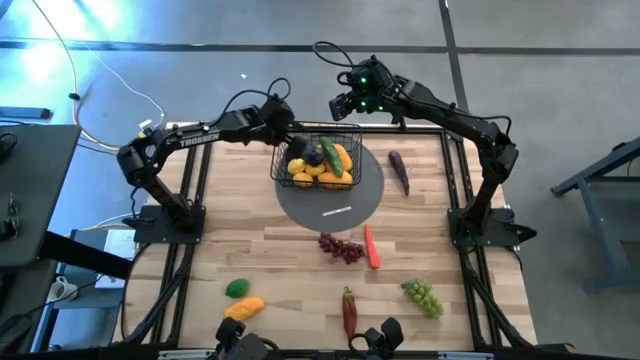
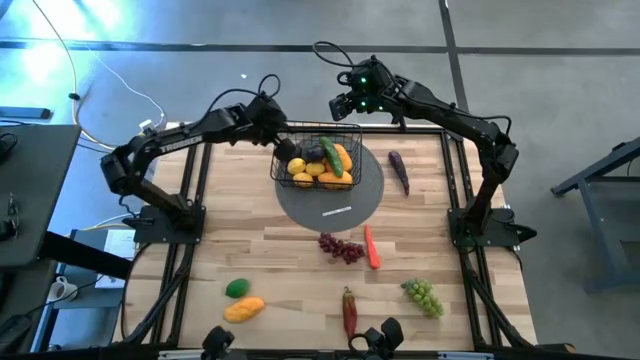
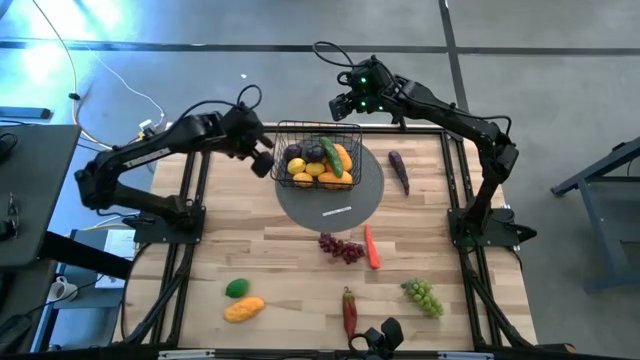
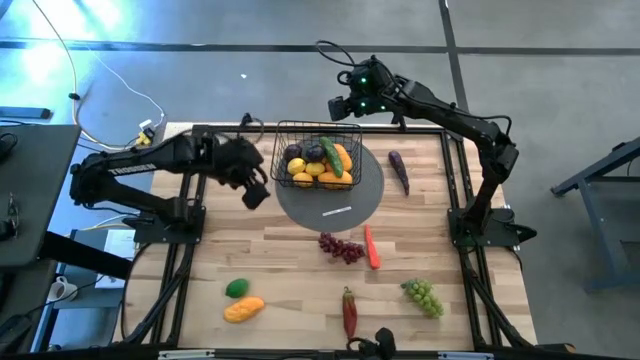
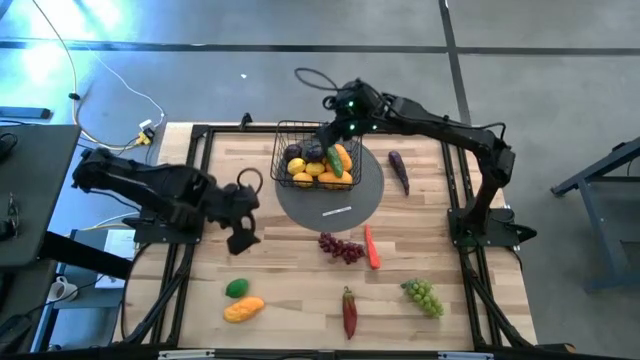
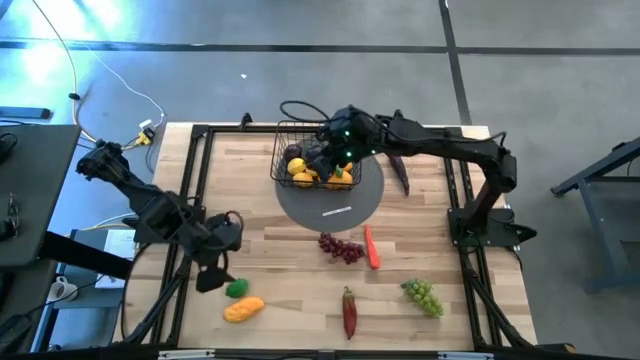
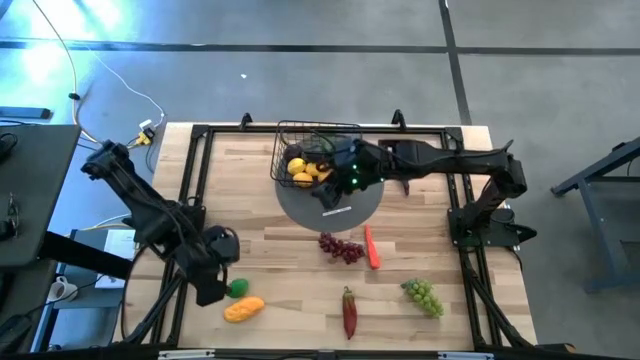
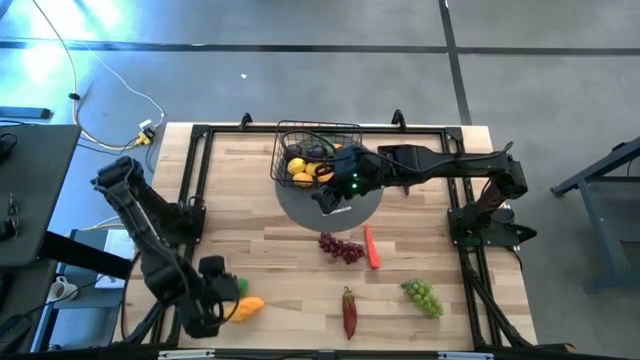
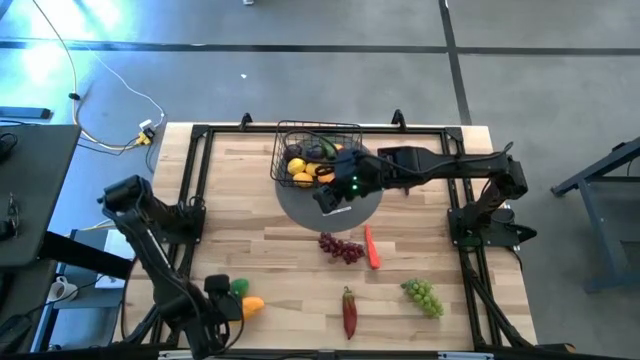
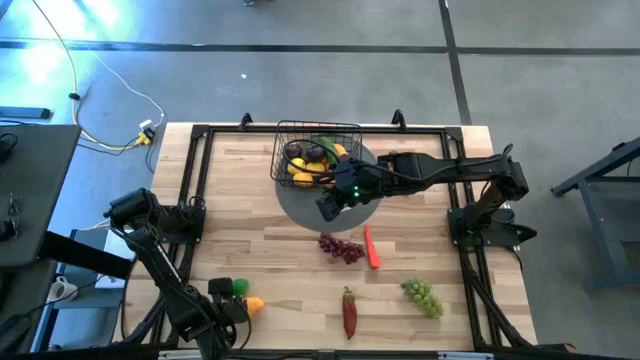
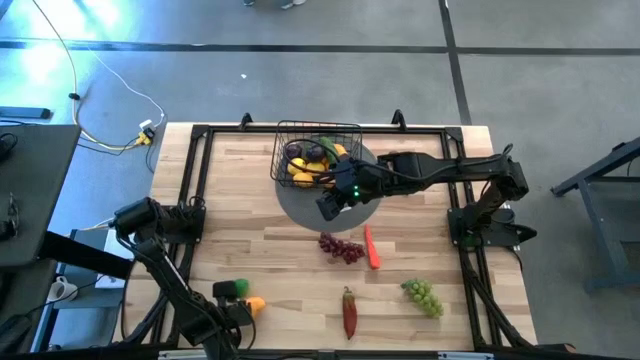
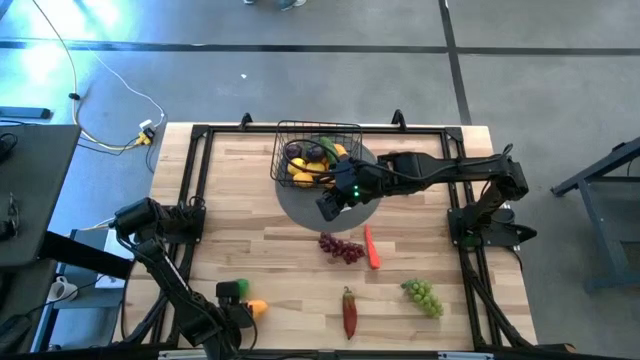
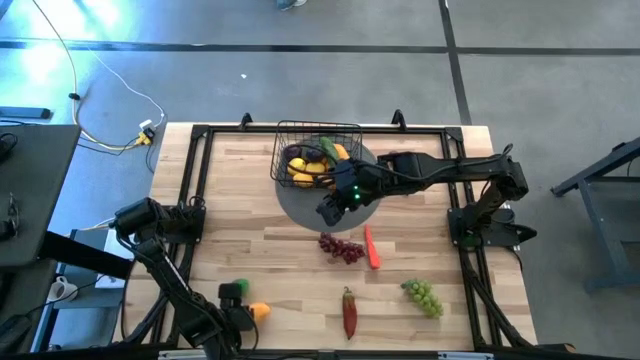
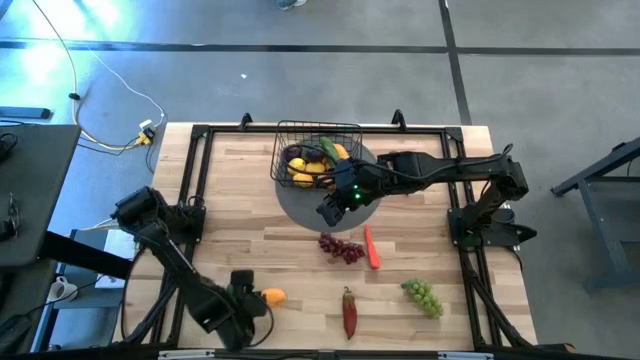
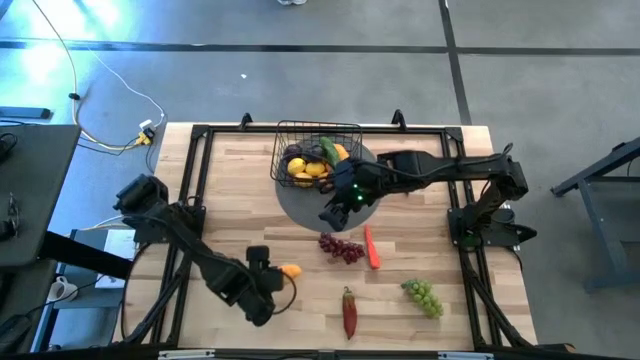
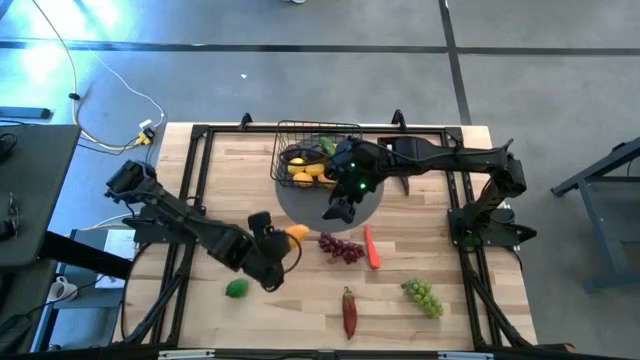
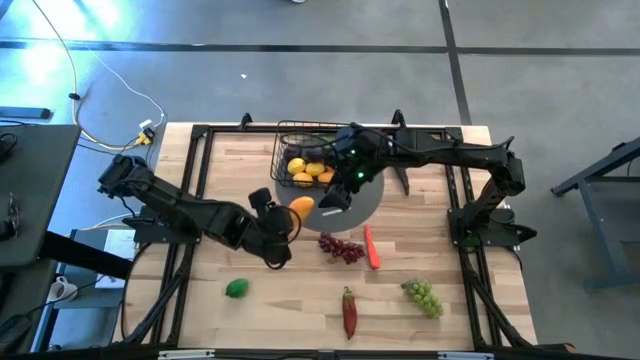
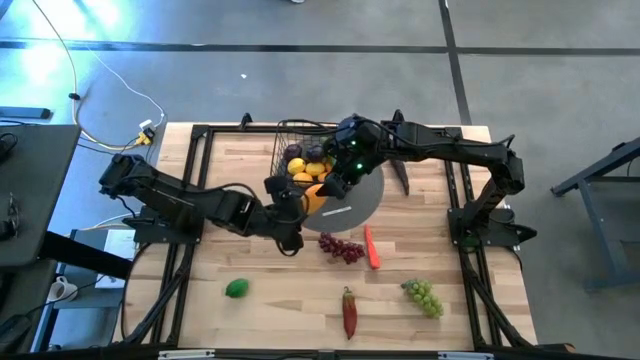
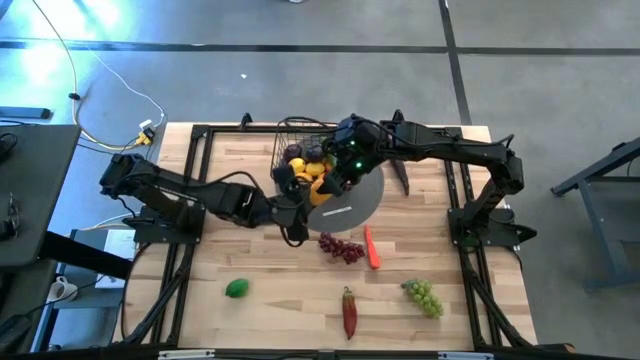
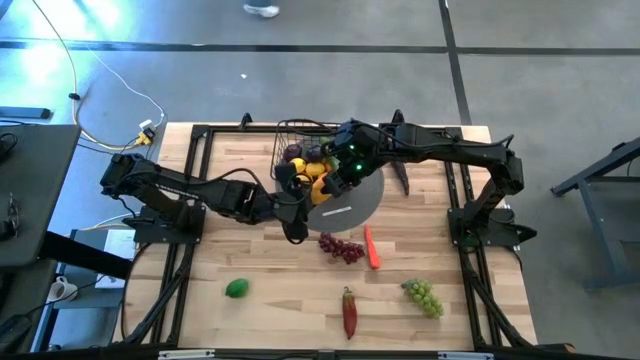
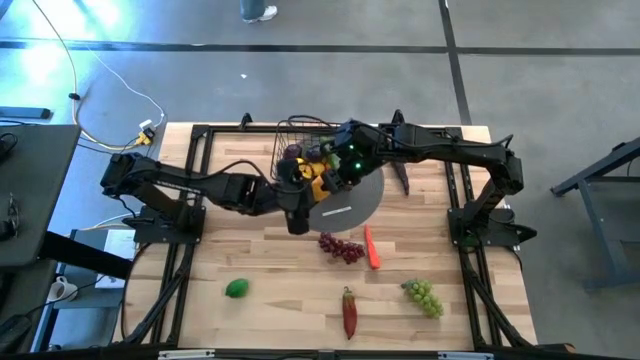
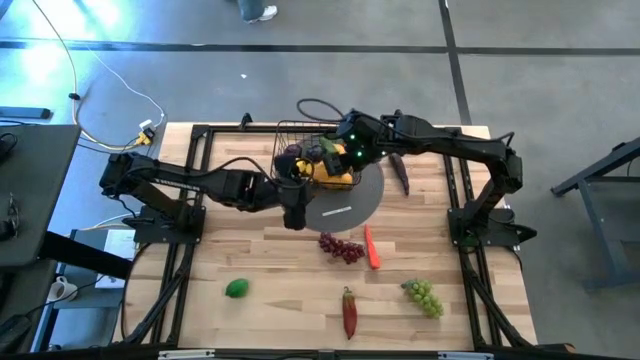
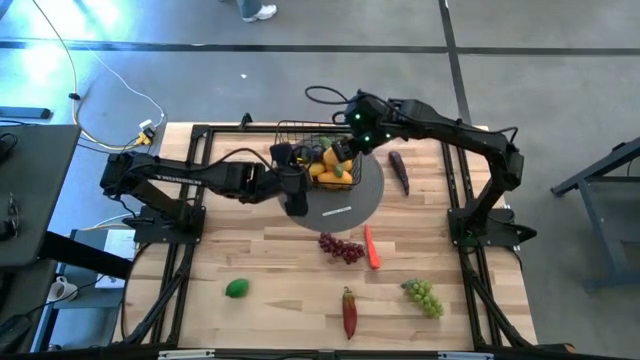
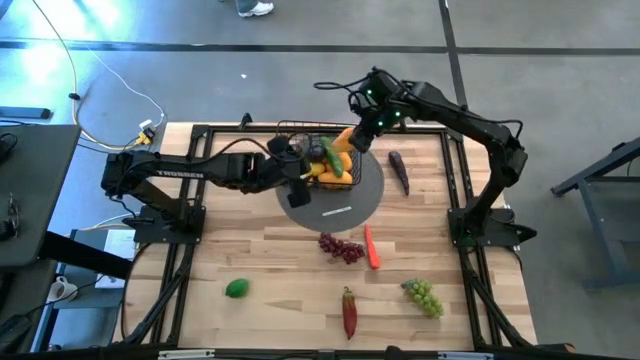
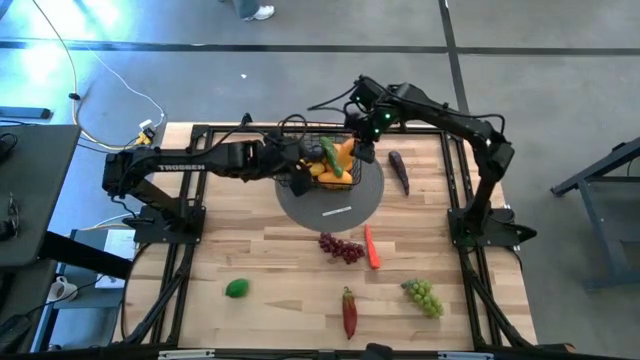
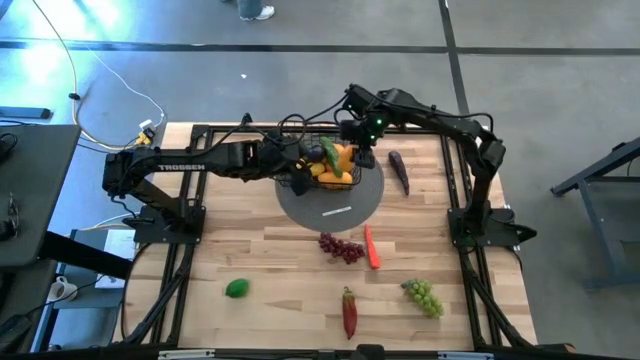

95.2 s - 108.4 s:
Task: Build produce basket
Put the yellow mango into the black wire basket

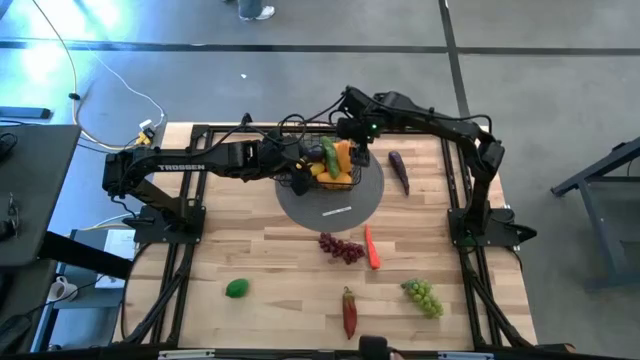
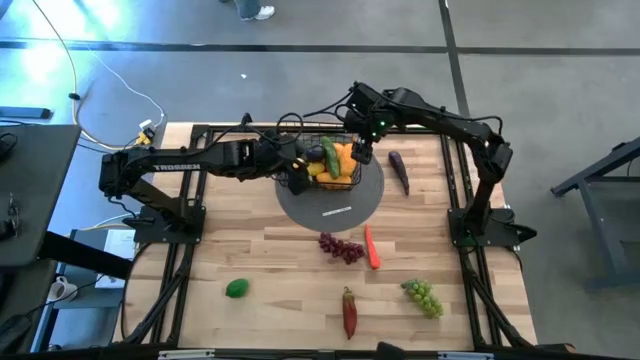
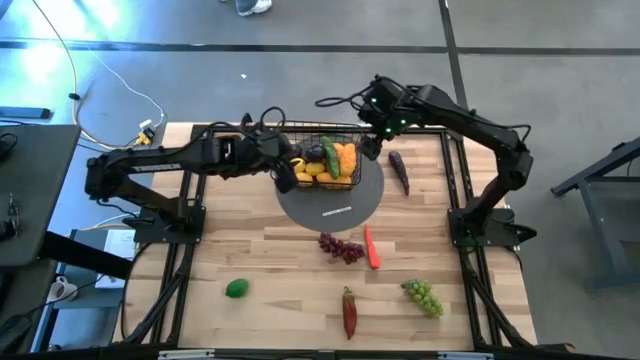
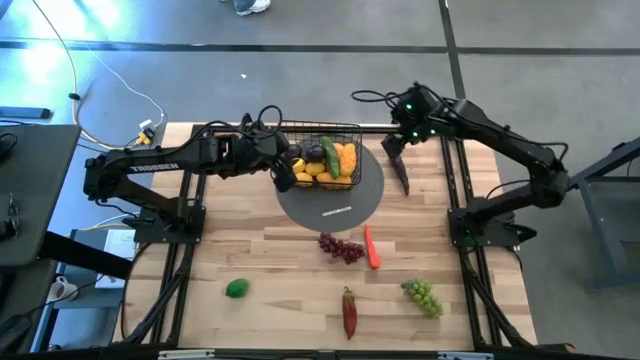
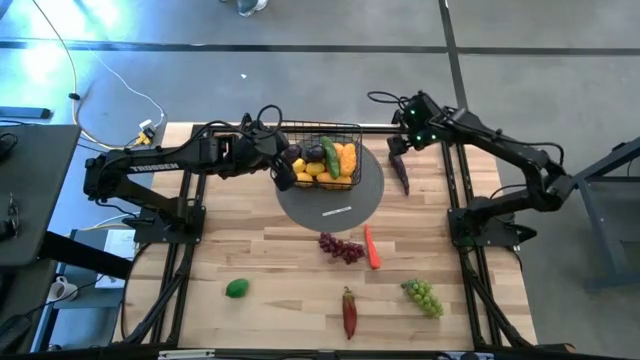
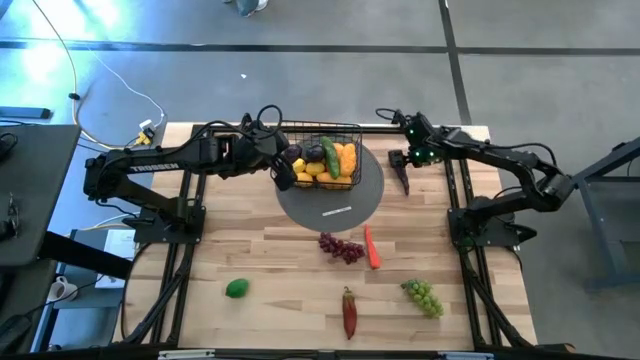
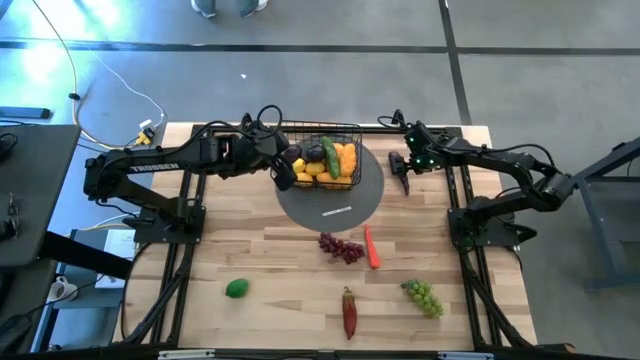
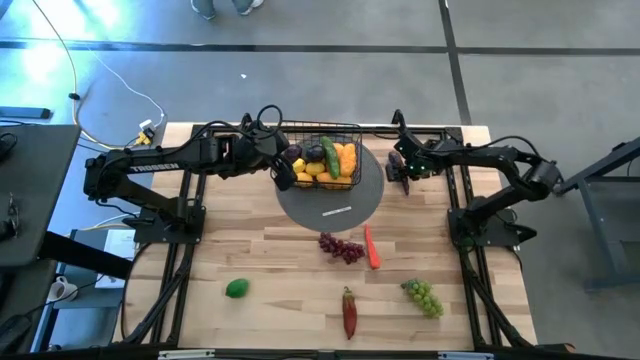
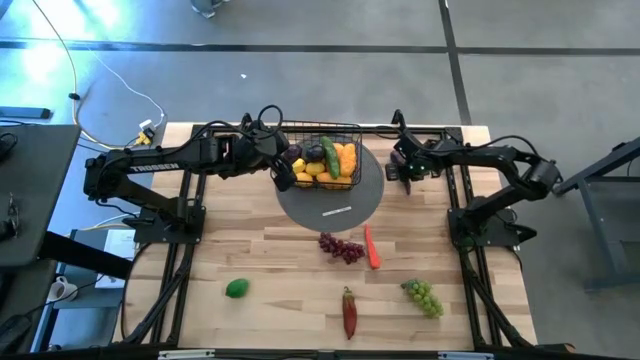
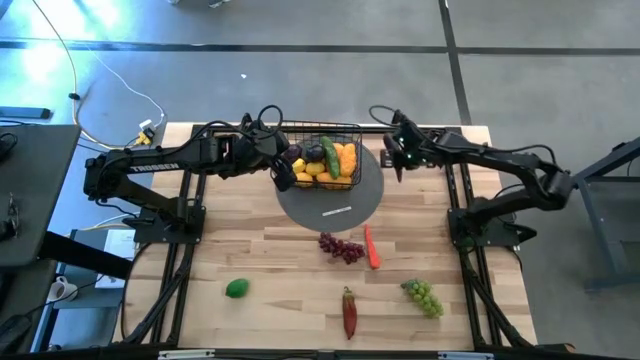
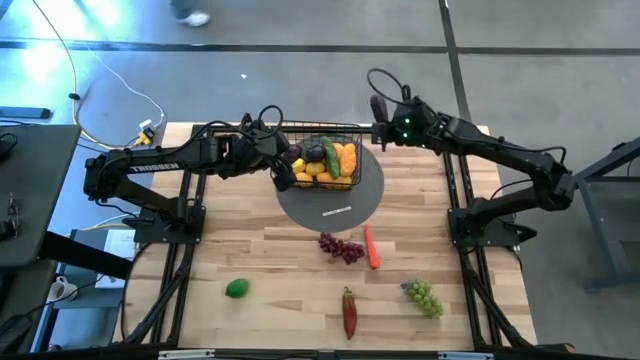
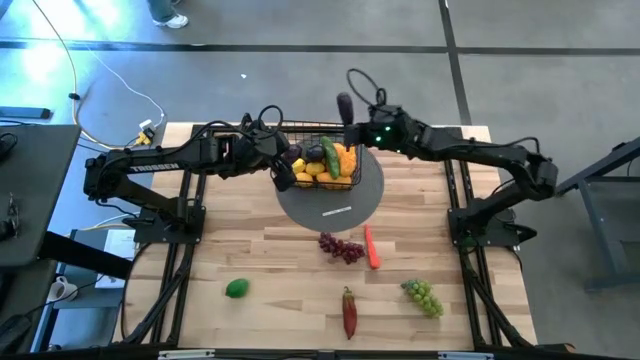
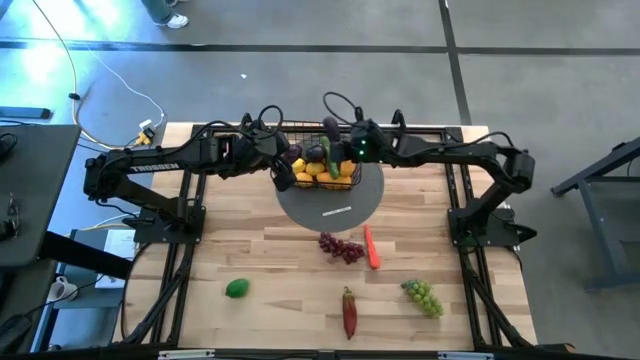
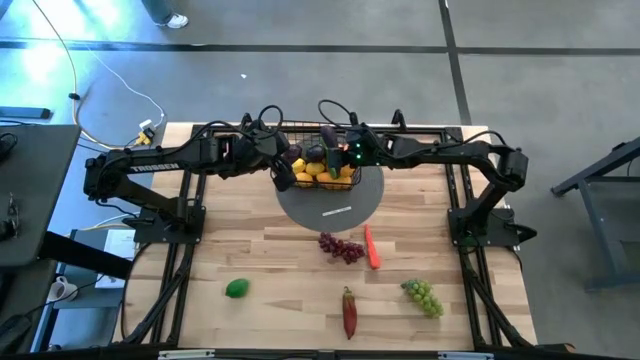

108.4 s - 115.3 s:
Put the purple eggplant into the black wire basket

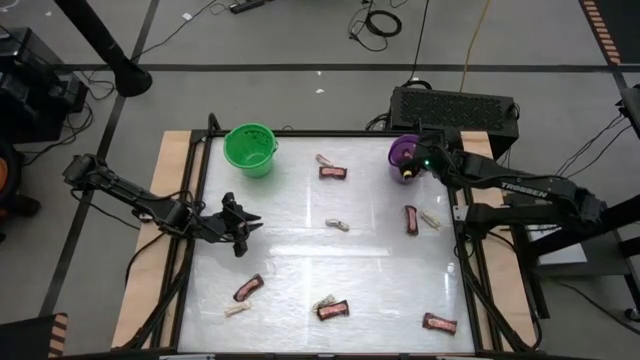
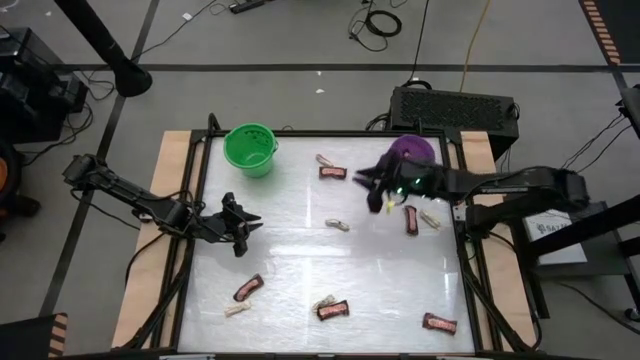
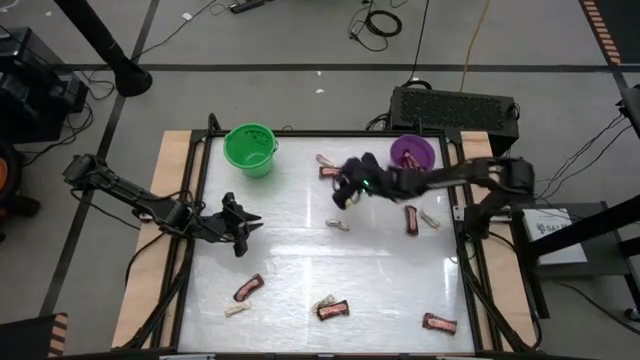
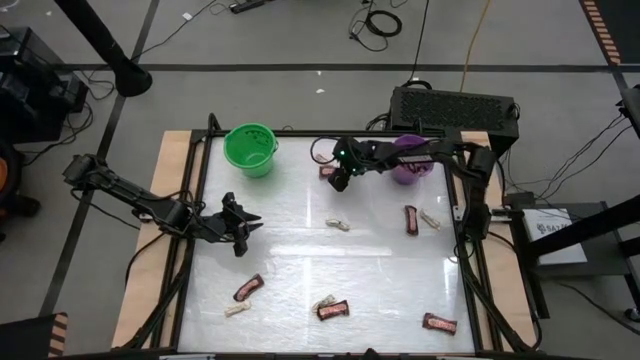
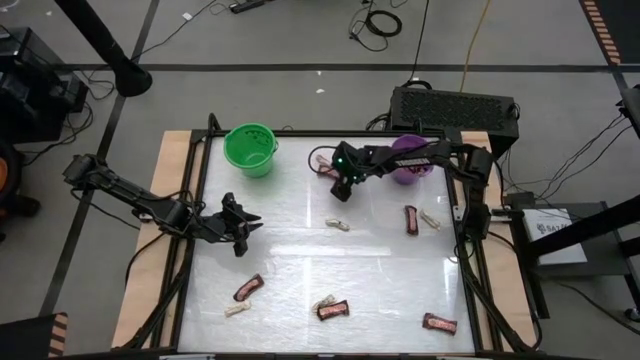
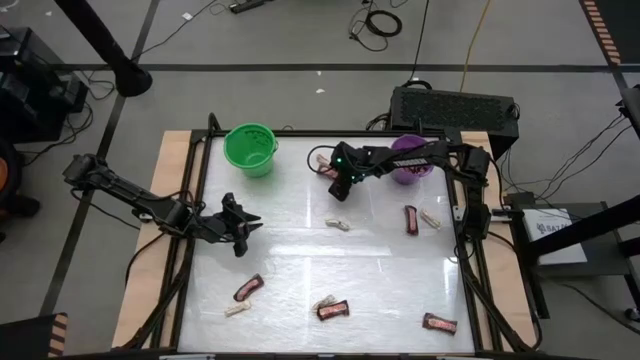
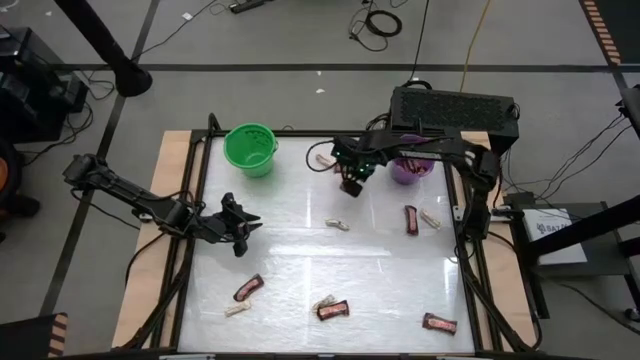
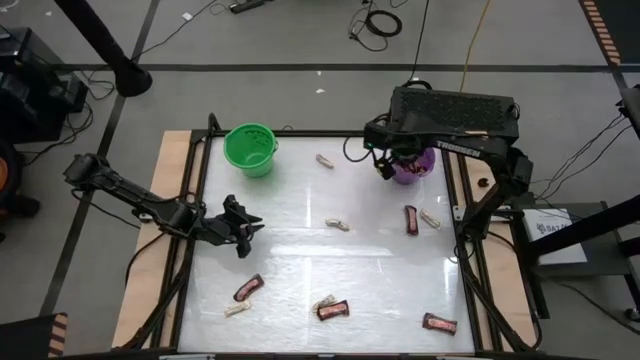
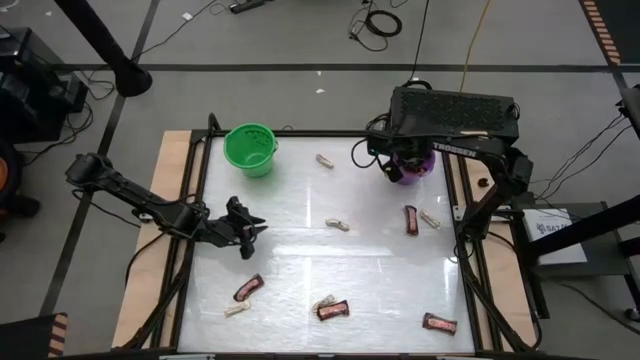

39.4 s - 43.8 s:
Task: Sort candy by brand, put in halloween buckets
Put the brown chocolate bar into the purple bucket
